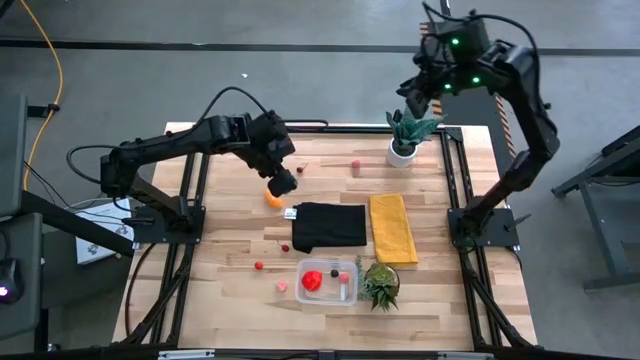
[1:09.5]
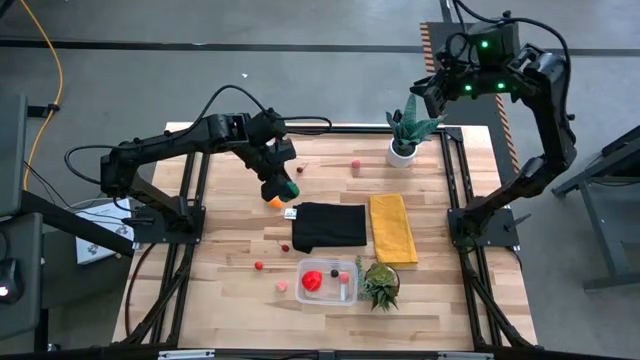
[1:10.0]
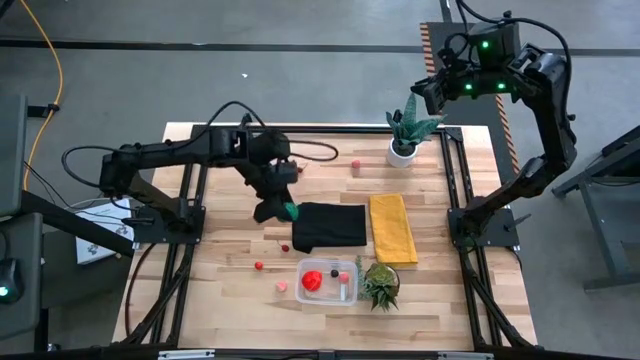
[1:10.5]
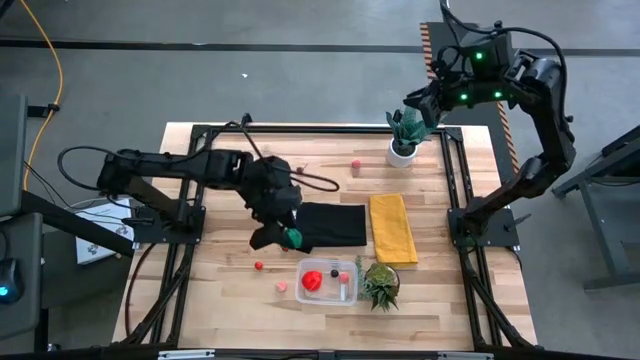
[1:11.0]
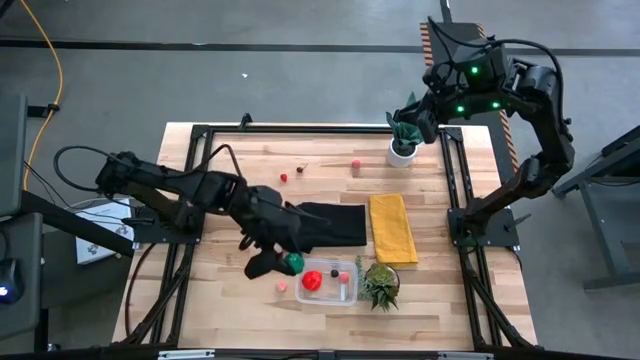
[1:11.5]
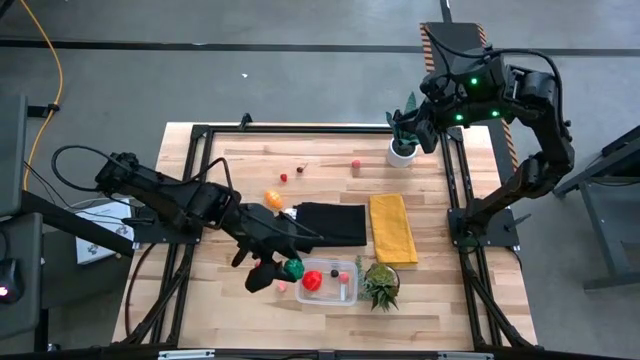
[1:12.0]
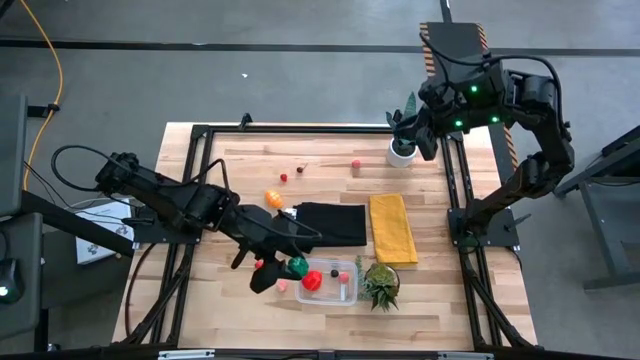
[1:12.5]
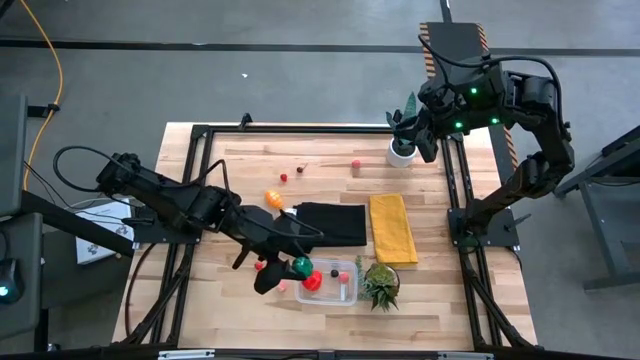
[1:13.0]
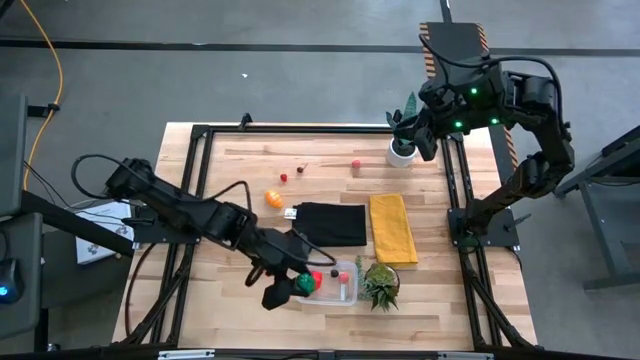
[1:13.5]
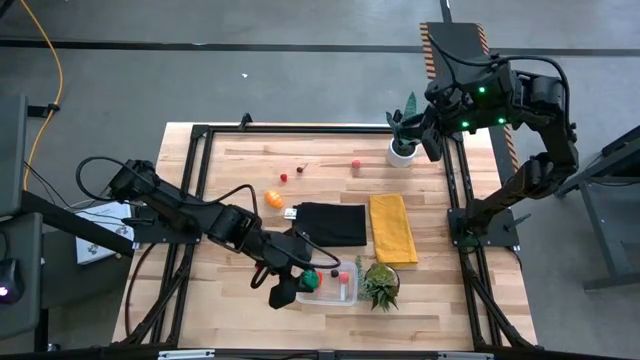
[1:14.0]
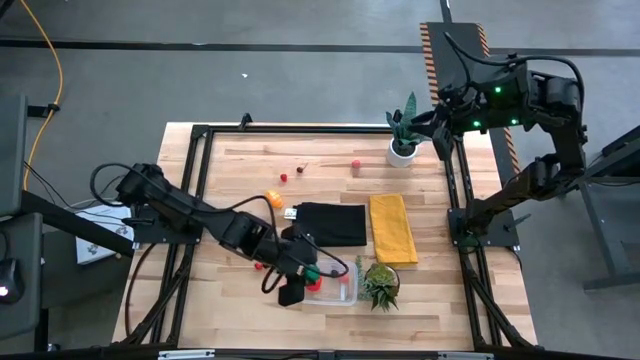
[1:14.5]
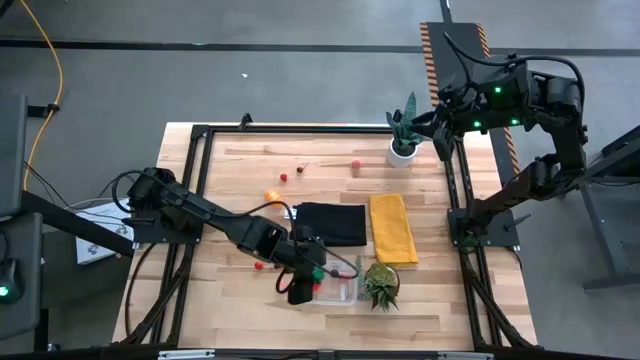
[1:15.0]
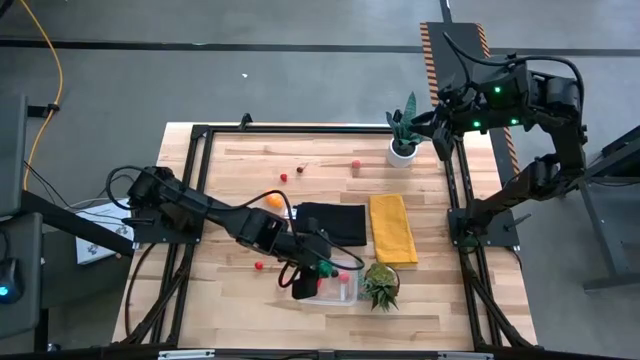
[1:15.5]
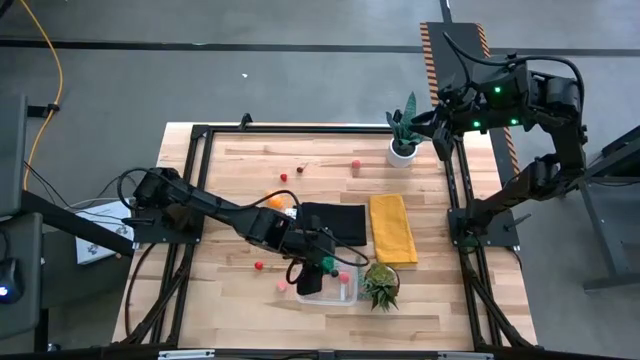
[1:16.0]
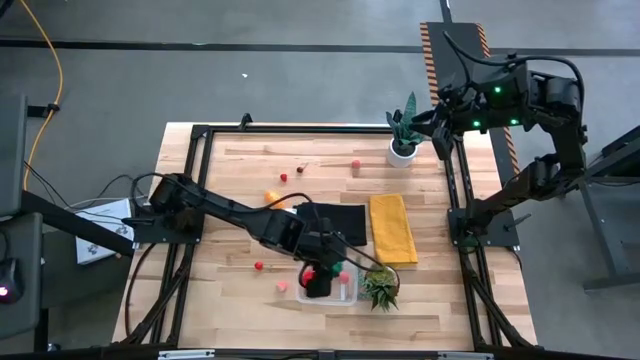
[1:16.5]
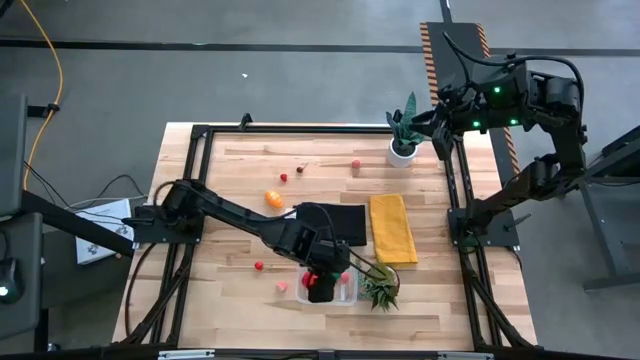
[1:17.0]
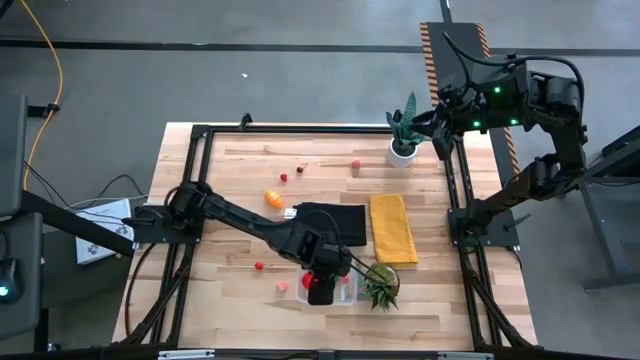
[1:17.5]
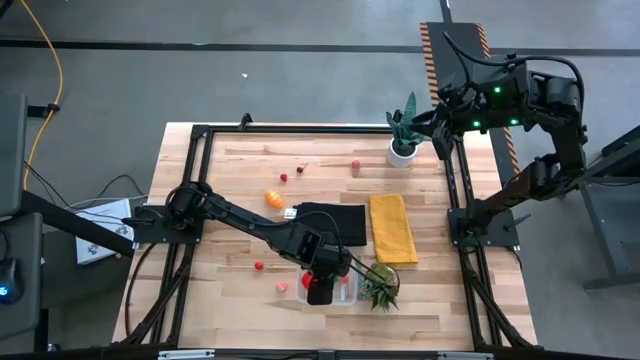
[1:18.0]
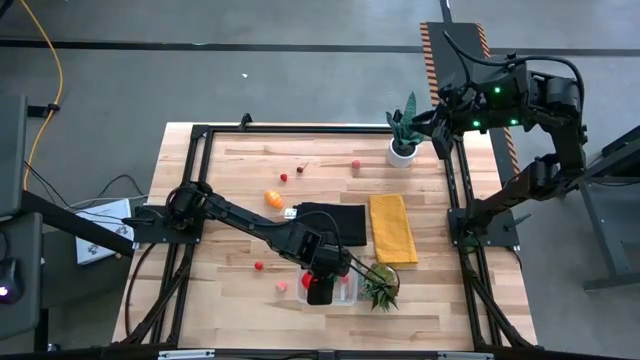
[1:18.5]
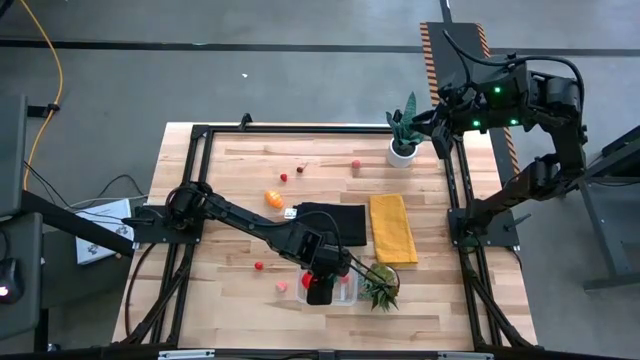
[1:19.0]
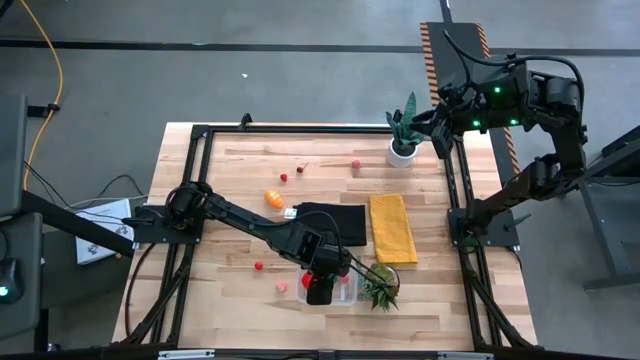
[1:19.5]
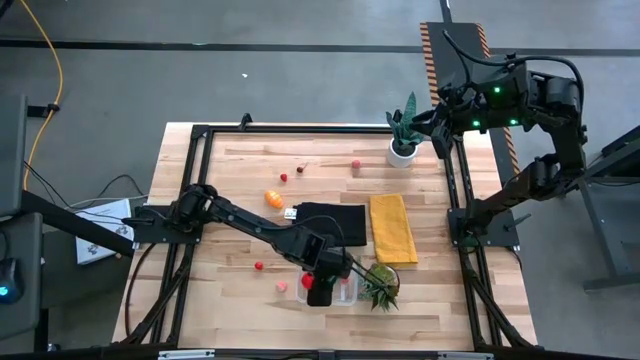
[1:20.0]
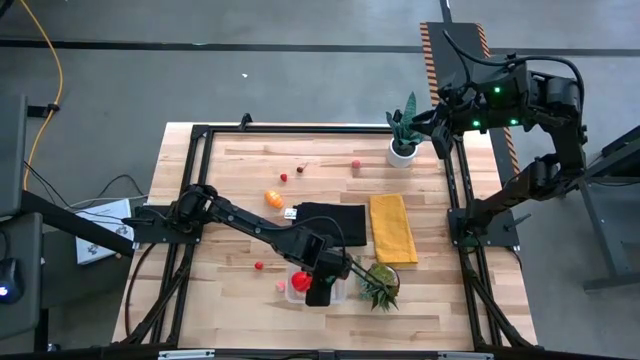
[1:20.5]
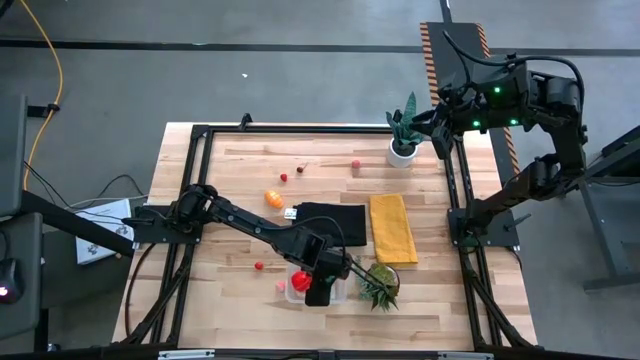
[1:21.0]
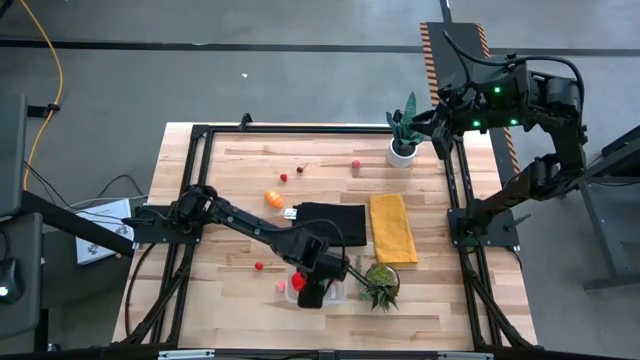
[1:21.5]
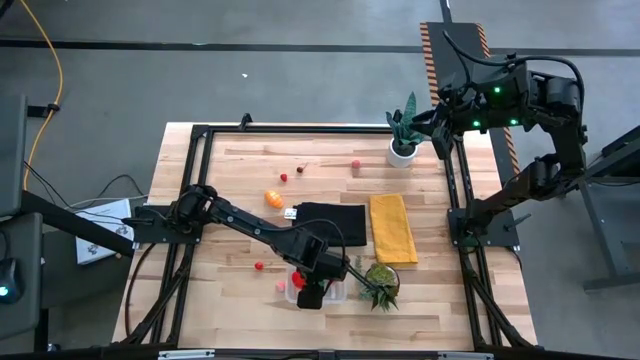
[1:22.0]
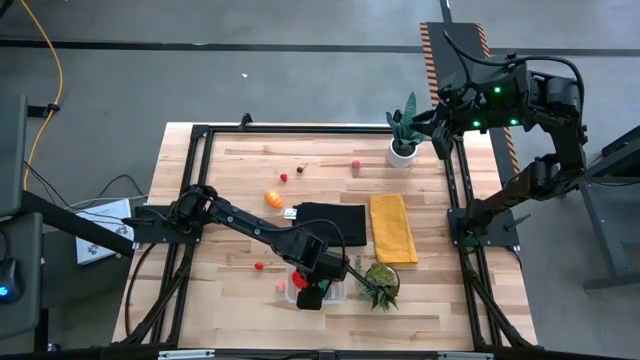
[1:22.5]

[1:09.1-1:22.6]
Task: Pick and placing Produce into tupperware
Put the bell pepper into the transparent bin

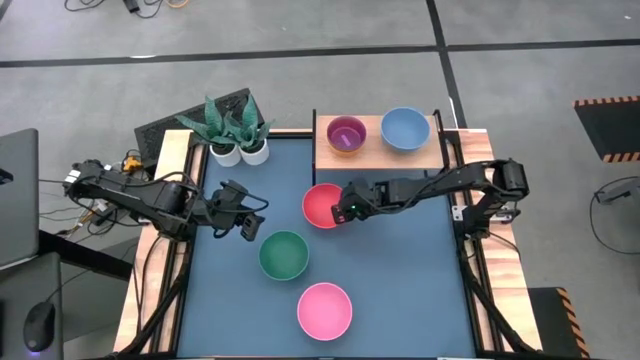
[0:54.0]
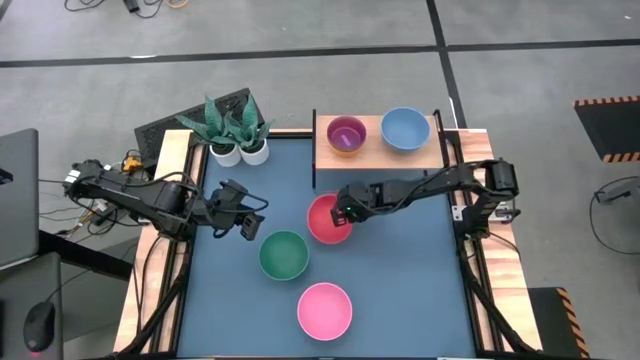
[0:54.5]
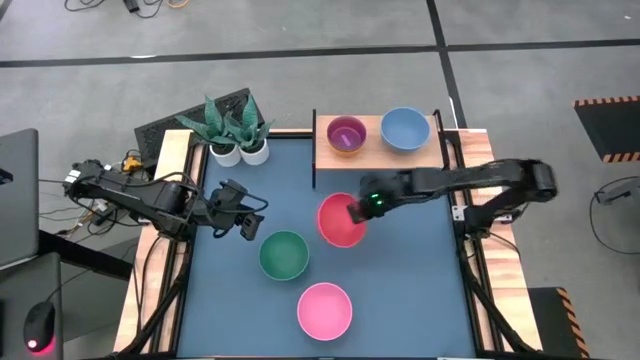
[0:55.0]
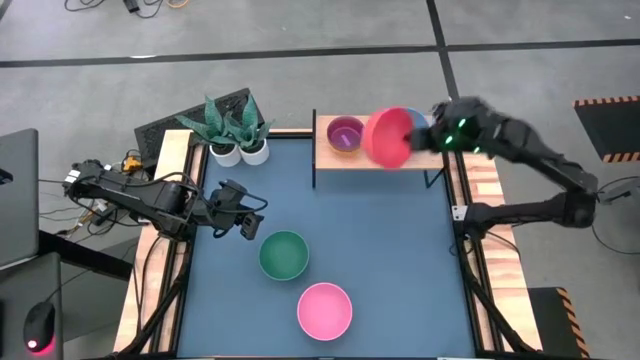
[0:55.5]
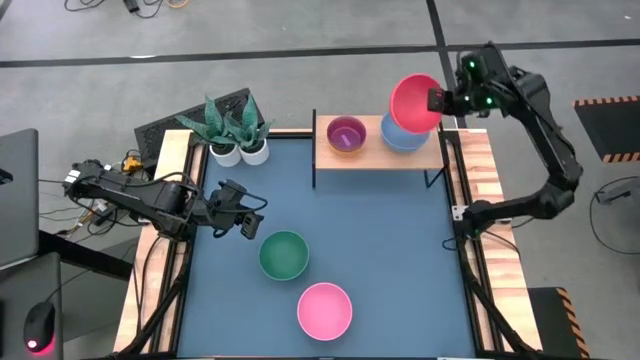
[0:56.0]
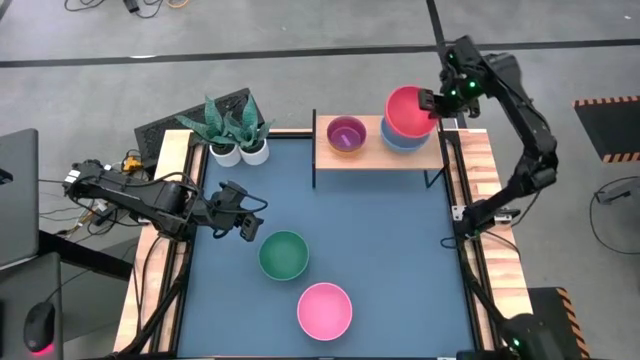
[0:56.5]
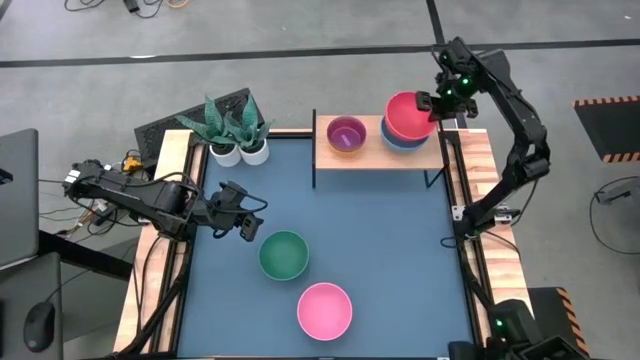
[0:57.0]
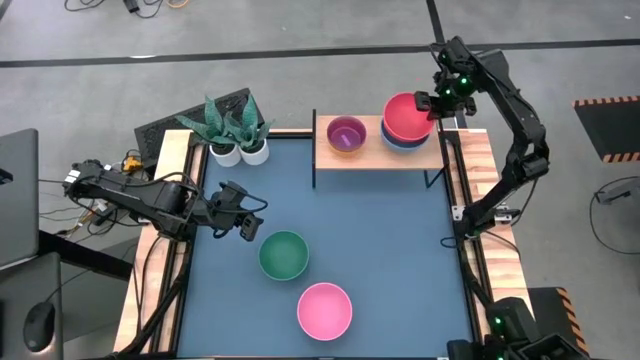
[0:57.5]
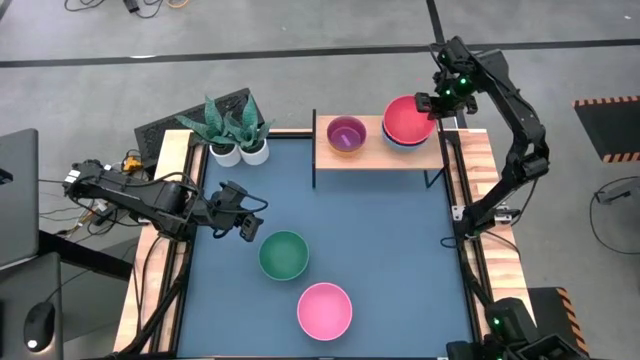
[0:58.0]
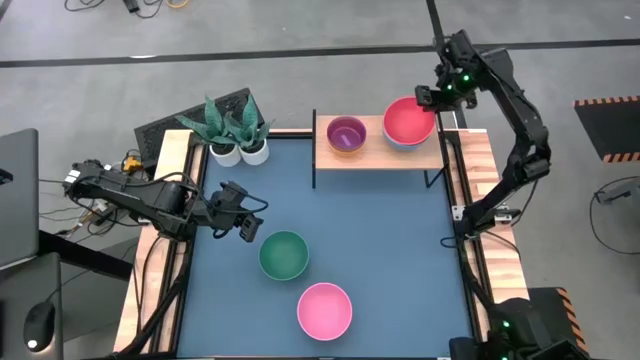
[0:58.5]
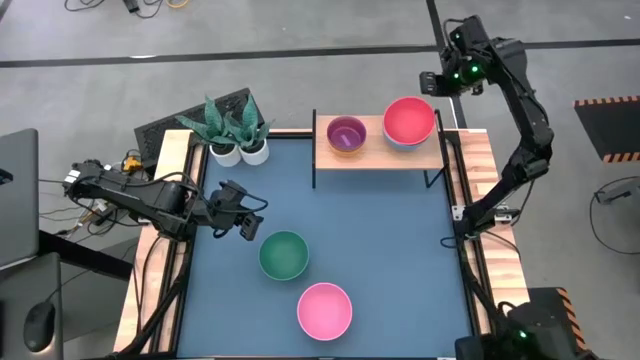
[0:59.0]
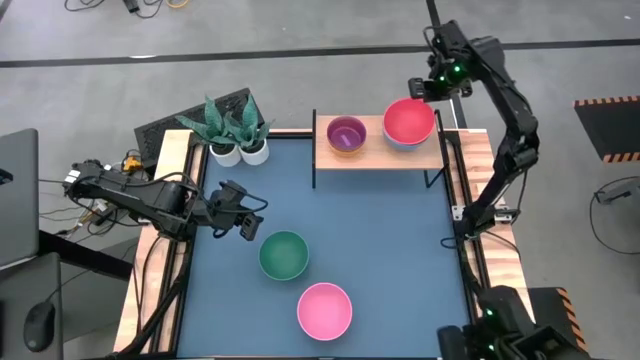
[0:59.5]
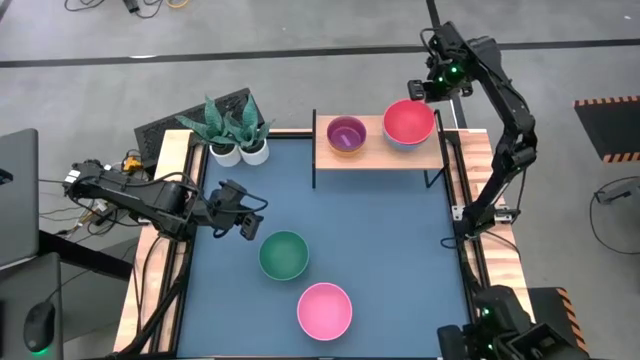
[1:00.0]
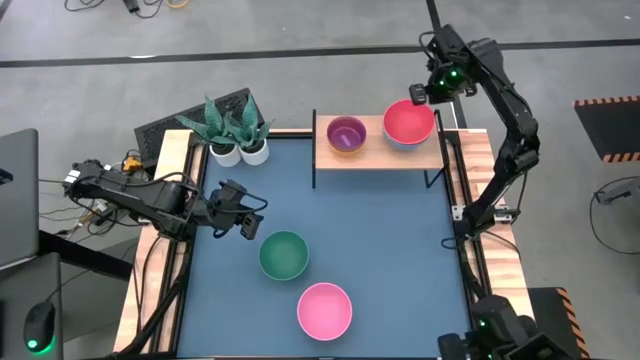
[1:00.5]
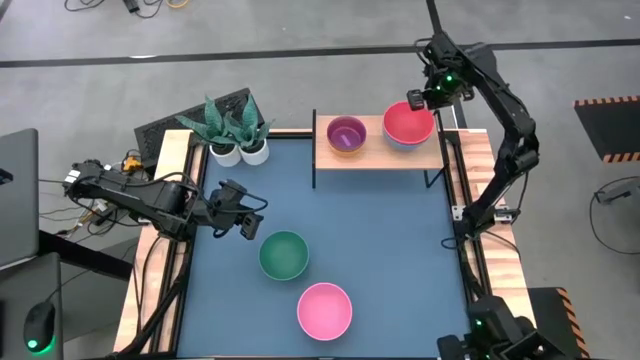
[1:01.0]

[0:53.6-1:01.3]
Task: Place and stack bowls onto a shelf
Stack the orange bowl on top of the blue bowl on the shelf
